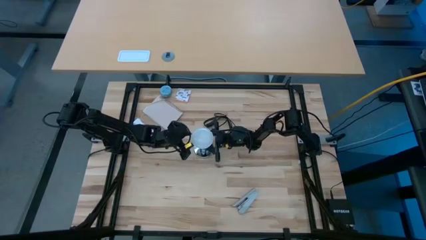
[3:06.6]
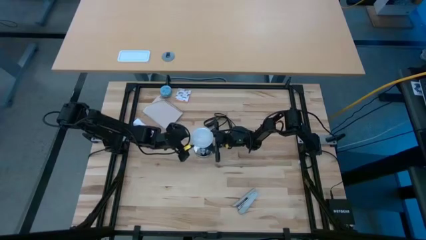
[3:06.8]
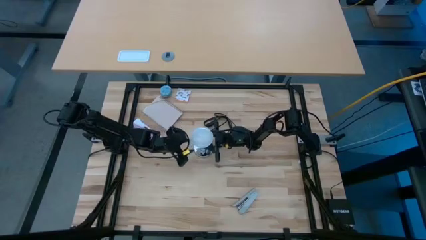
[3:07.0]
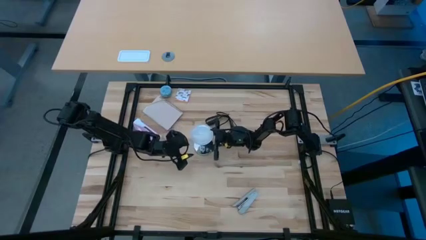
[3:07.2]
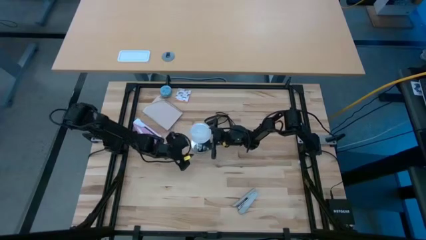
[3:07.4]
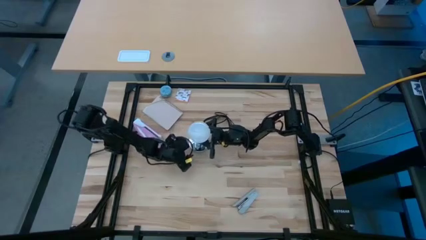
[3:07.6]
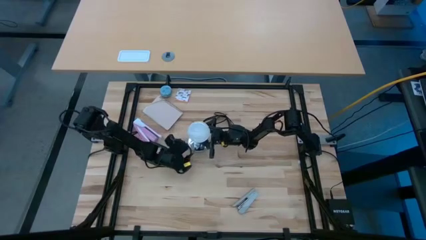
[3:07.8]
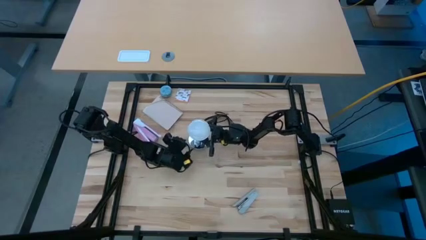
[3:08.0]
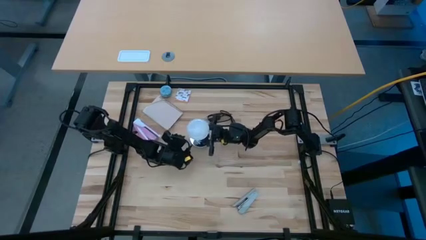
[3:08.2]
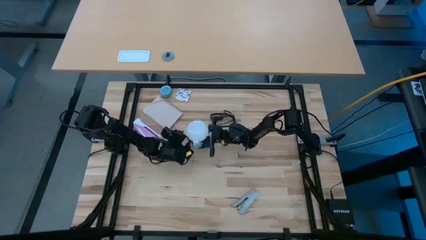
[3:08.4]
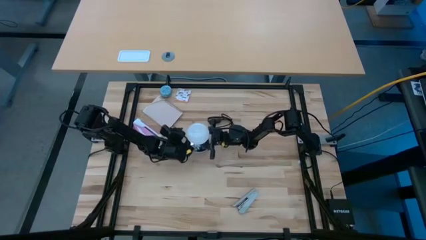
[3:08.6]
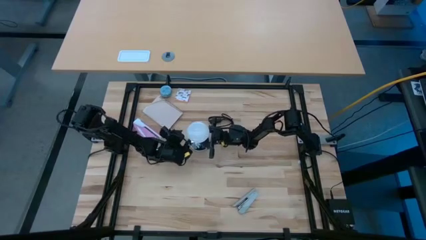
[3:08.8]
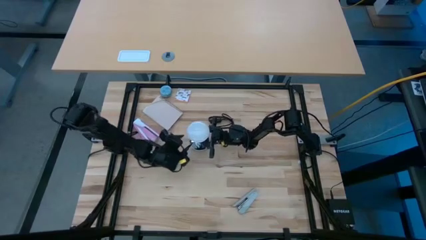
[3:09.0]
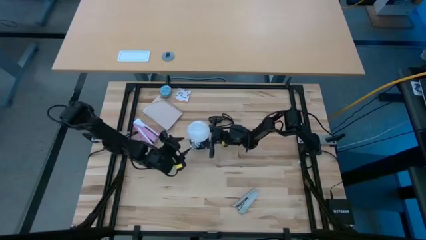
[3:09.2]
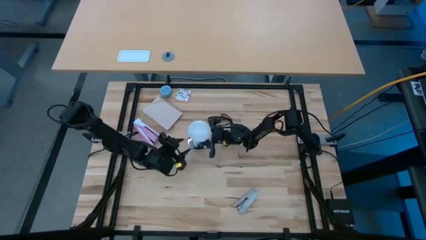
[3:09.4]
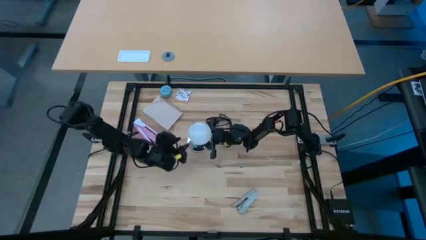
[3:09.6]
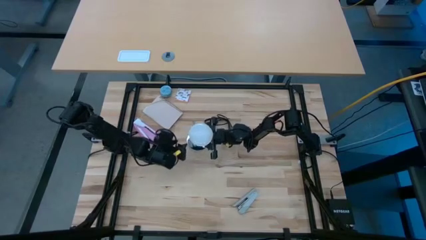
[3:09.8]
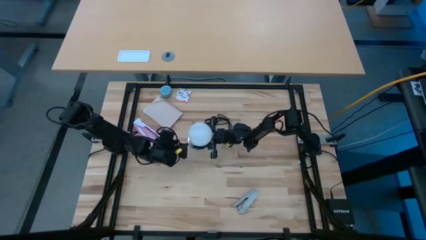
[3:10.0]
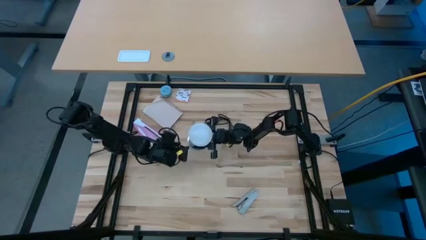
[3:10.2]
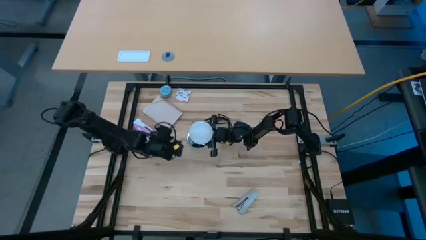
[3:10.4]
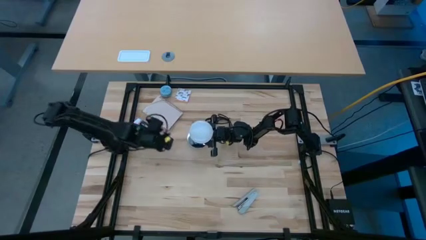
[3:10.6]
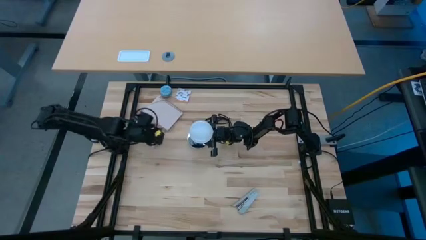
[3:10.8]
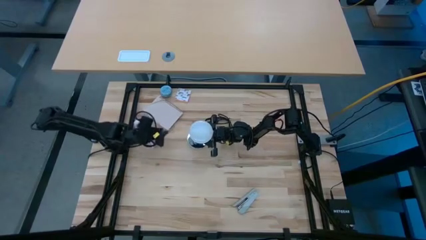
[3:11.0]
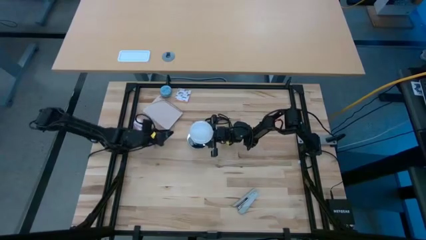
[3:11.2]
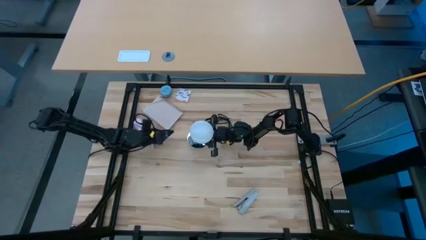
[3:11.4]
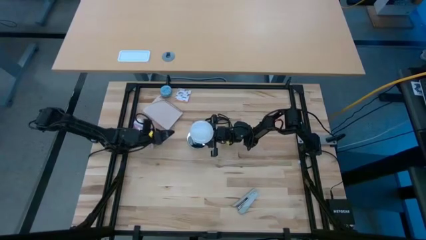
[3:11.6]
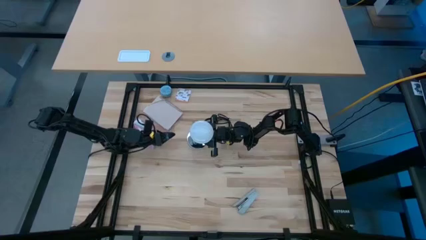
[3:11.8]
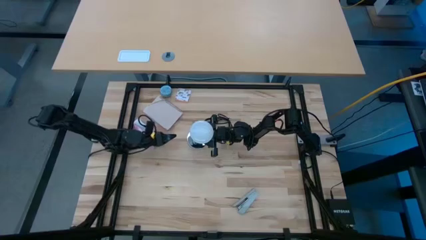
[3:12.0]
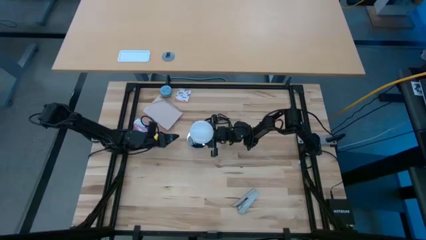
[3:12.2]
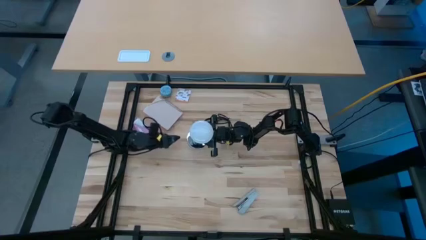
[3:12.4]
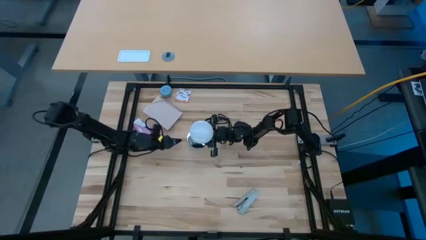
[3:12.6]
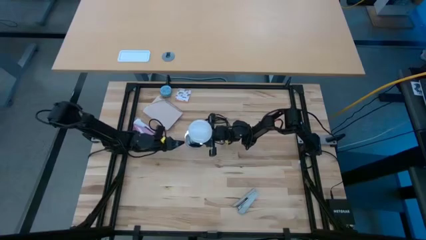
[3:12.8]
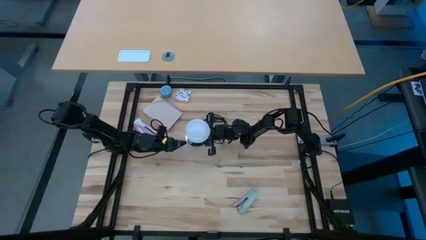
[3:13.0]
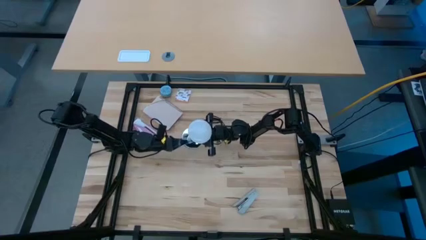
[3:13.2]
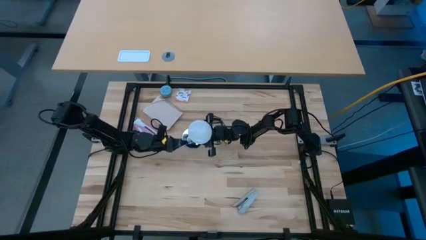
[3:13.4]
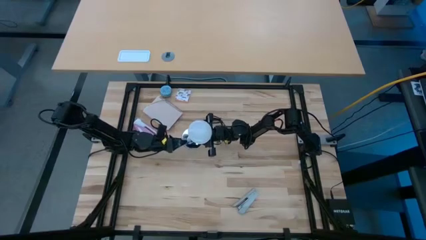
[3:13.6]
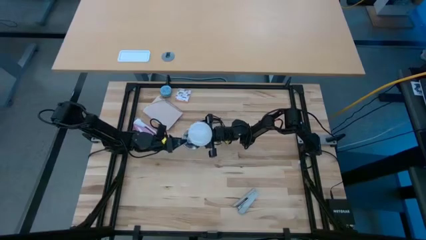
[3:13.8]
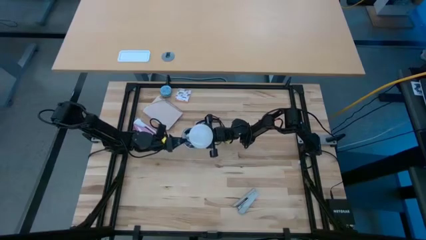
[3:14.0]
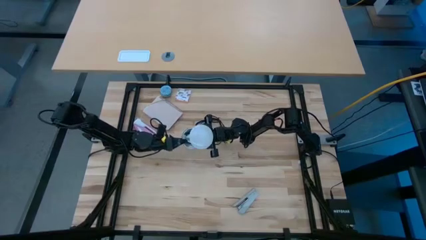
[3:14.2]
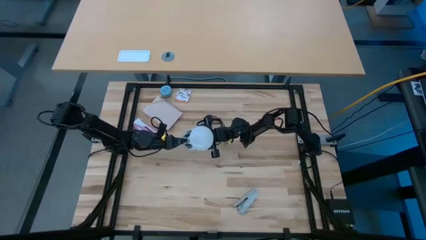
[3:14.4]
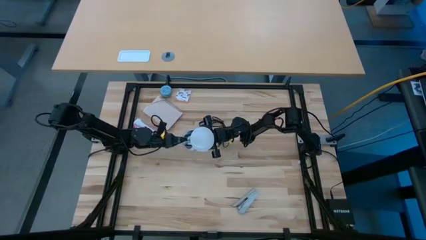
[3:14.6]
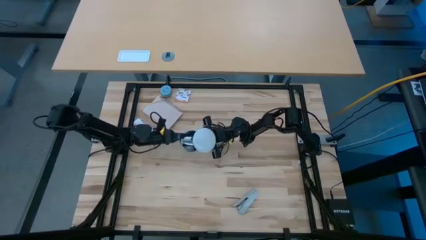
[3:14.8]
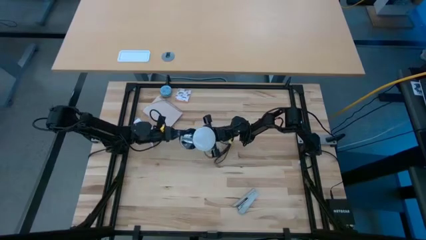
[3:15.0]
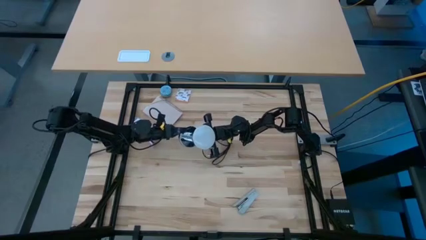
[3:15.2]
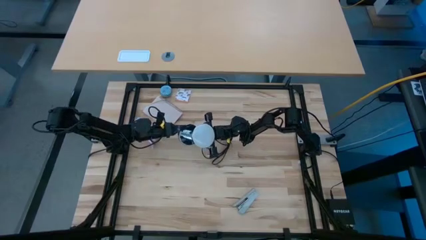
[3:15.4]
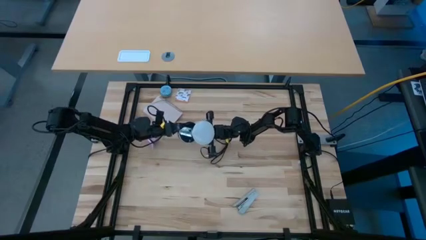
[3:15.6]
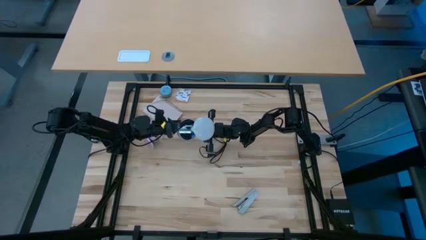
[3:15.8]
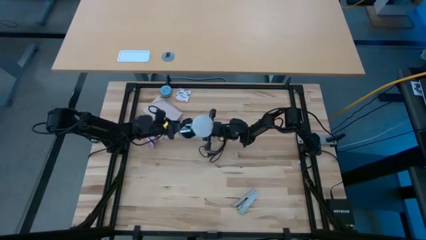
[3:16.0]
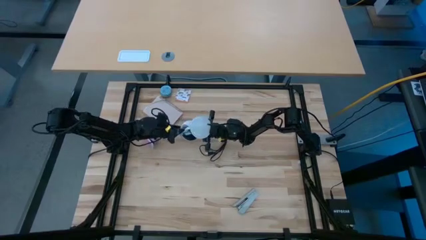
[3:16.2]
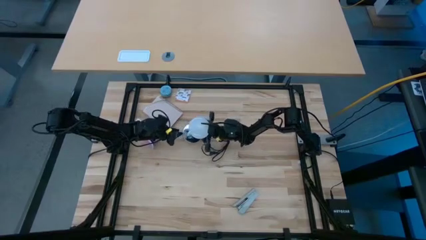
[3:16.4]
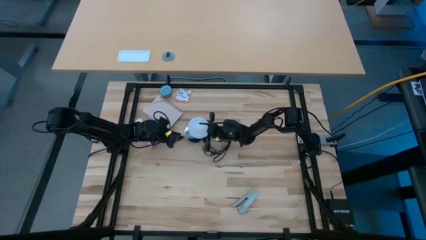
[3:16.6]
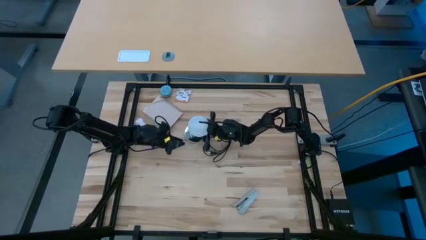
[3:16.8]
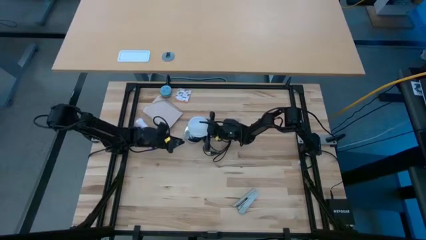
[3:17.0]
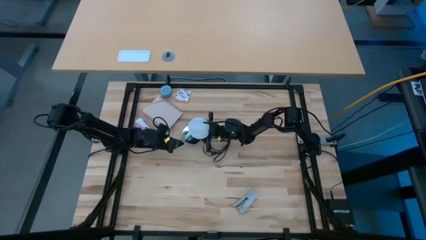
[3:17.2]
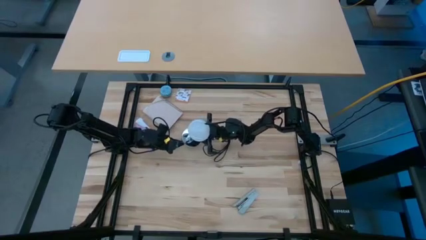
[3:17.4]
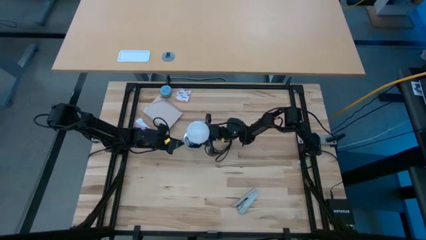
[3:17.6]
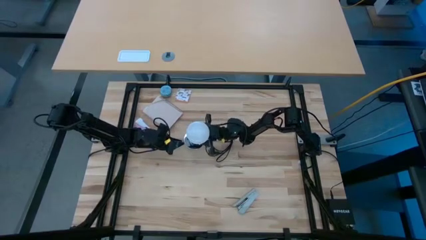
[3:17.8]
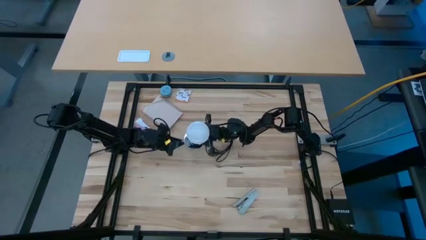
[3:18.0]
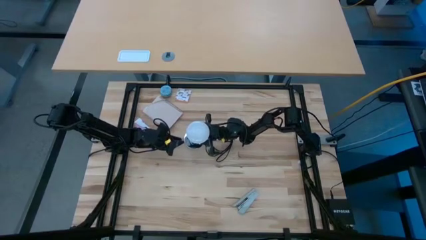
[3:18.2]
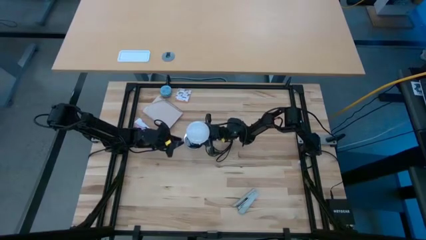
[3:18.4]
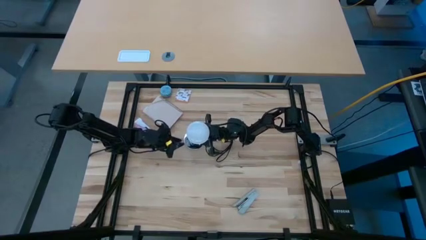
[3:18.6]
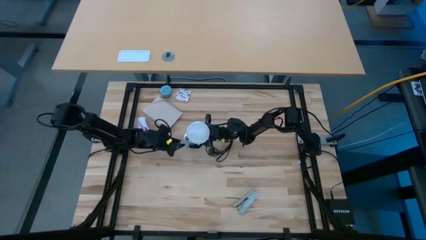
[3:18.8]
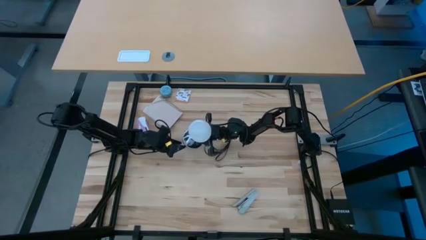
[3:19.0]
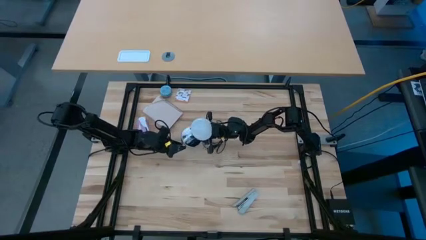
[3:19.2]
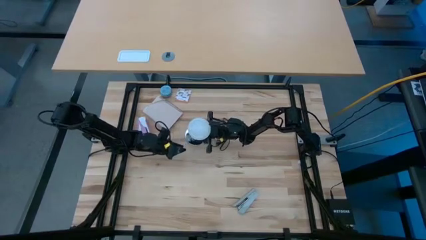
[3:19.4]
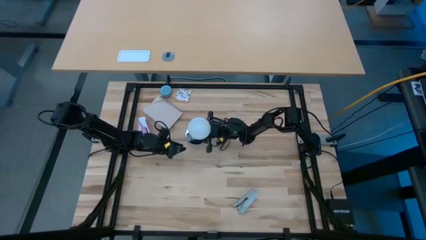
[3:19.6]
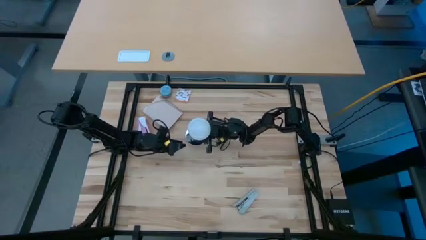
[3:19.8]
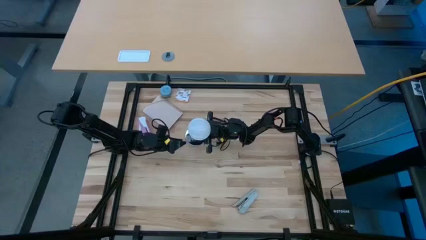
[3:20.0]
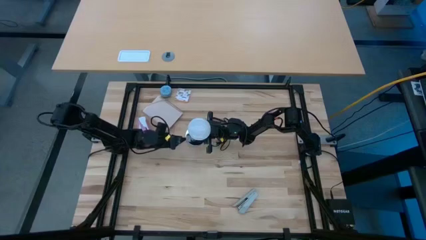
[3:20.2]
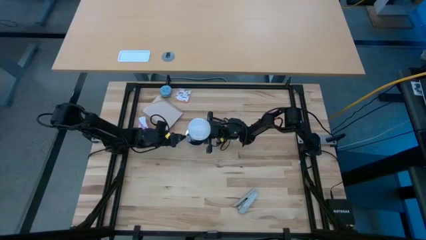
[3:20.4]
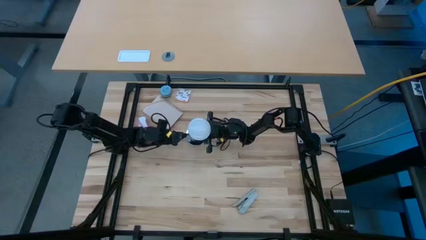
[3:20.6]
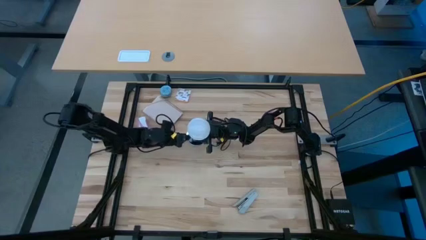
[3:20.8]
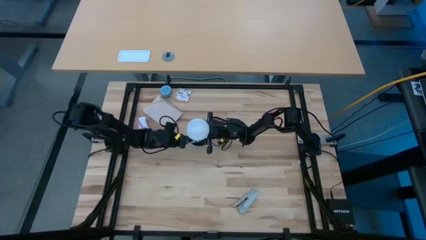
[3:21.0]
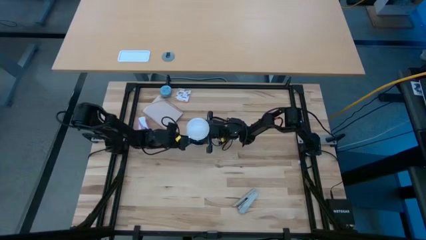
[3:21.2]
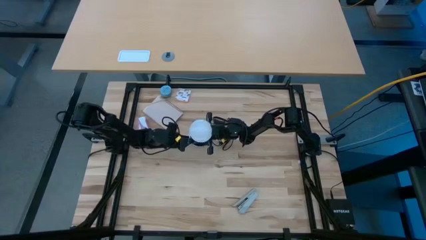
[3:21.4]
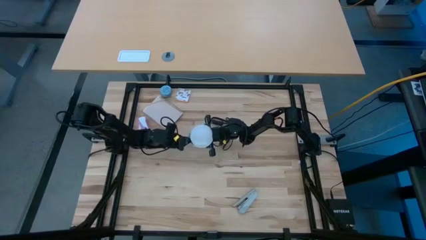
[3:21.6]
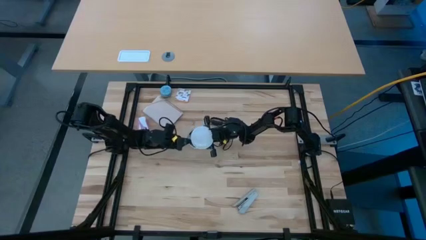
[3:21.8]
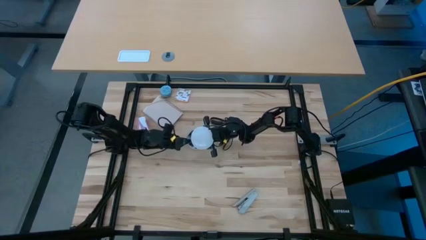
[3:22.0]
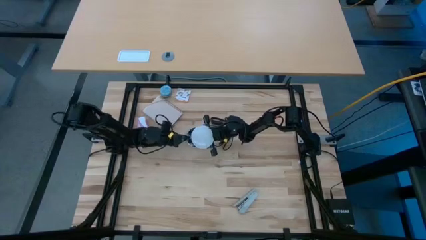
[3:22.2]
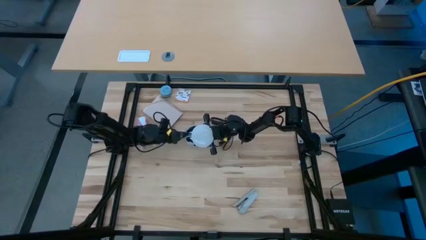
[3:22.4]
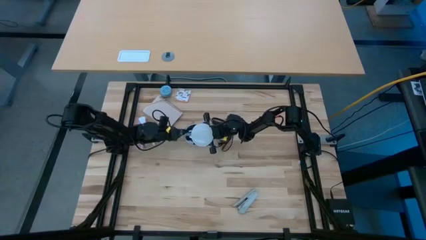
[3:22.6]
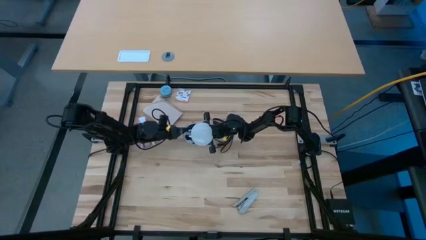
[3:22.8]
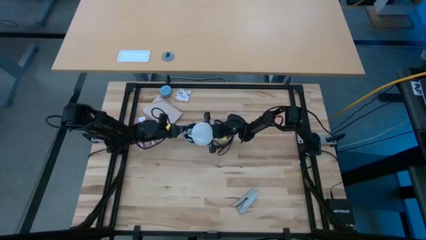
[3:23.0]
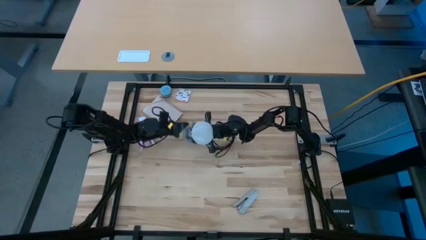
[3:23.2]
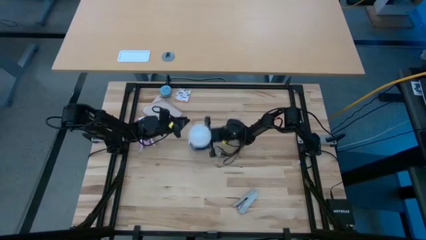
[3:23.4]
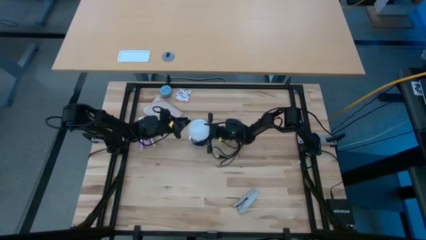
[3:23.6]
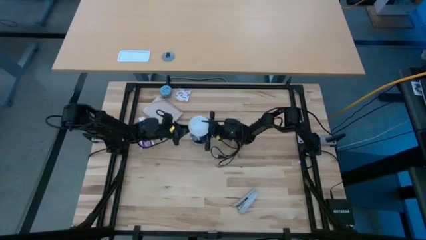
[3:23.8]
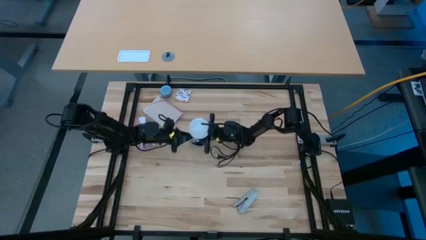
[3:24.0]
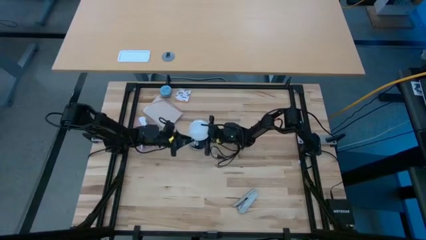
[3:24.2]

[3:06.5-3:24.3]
Task: Screw lightbulb
Remove the lightbulb from the lamp
